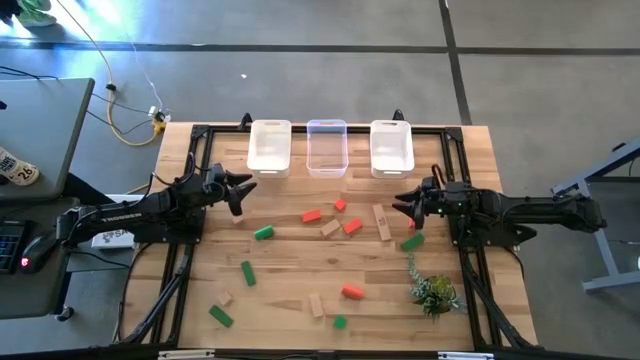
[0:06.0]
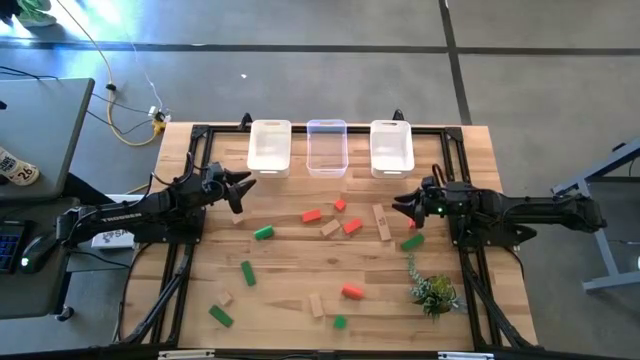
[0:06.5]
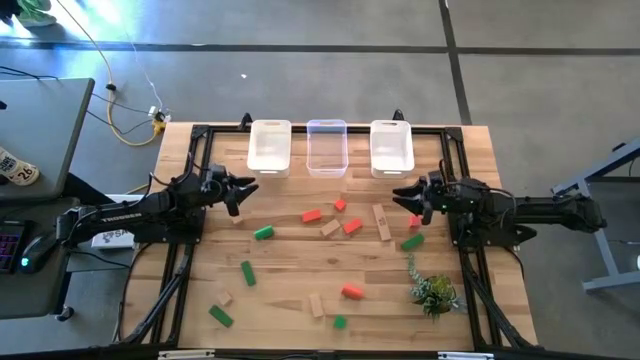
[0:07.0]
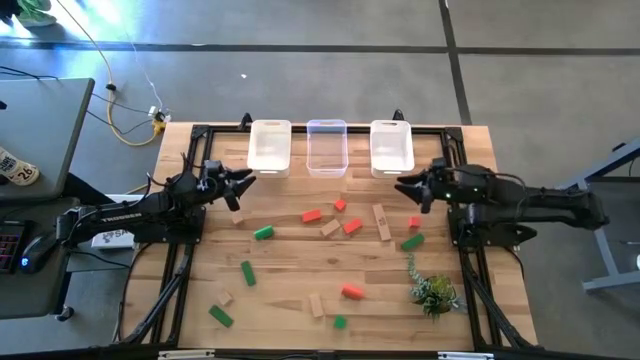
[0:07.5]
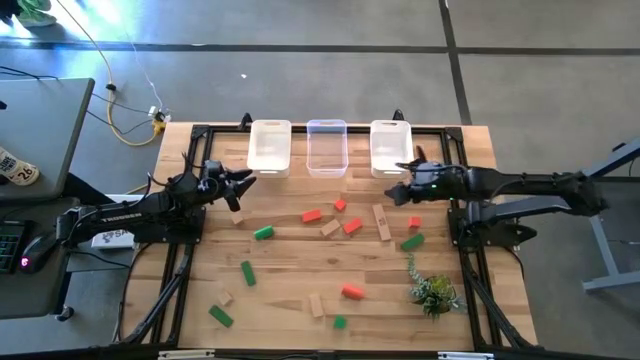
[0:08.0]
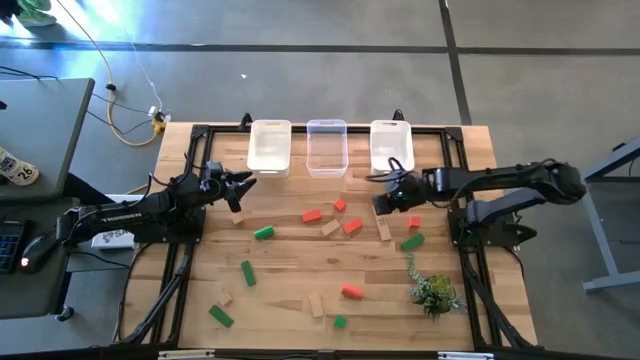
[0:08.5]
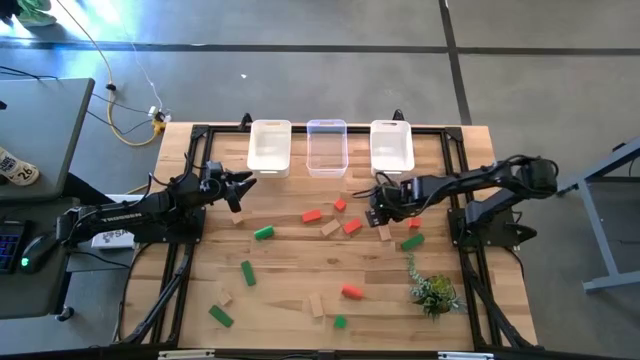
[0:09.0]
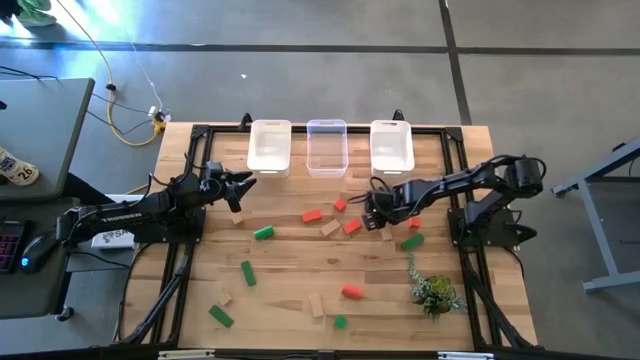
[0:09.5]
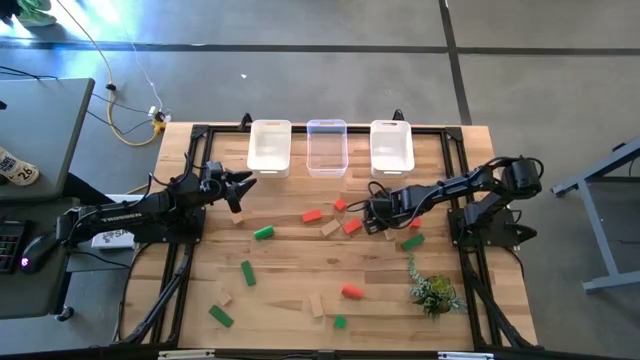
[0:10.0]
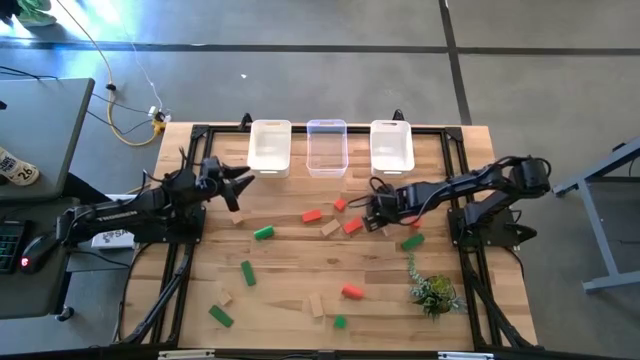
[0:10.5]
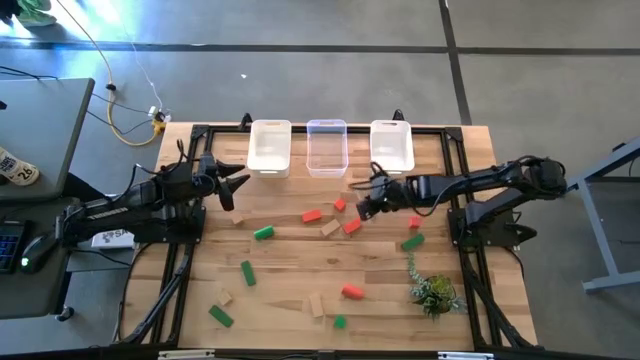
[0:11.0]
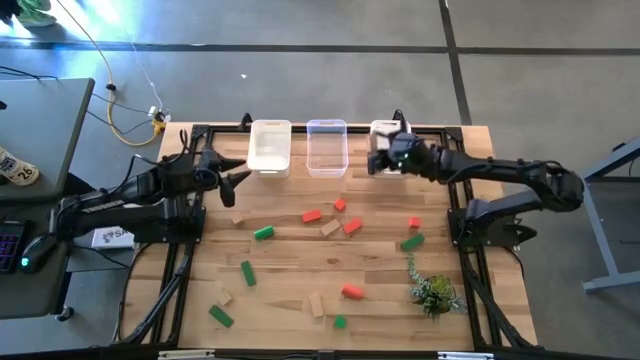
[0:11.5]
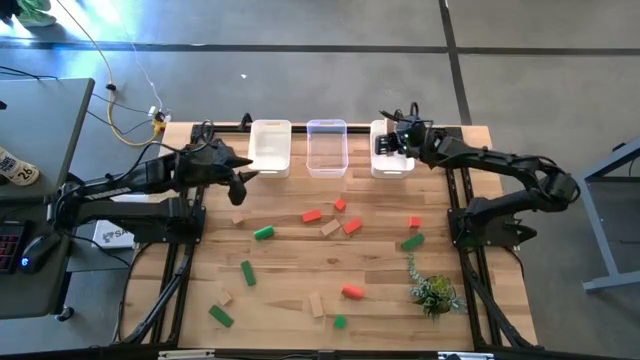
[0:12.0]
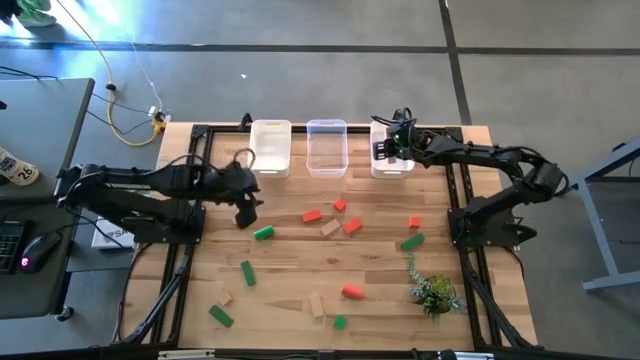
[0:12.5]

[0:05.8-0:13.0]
Task: Sort & place blocks by color
Put the brown block into the right white bin

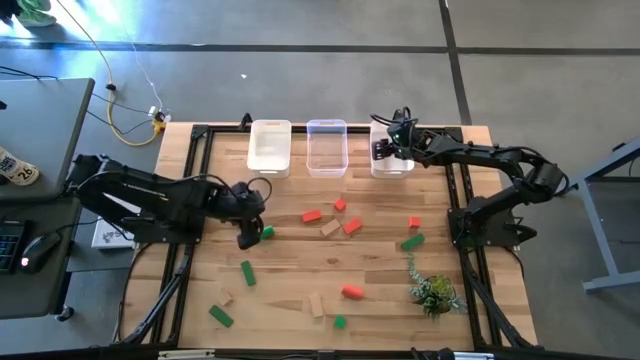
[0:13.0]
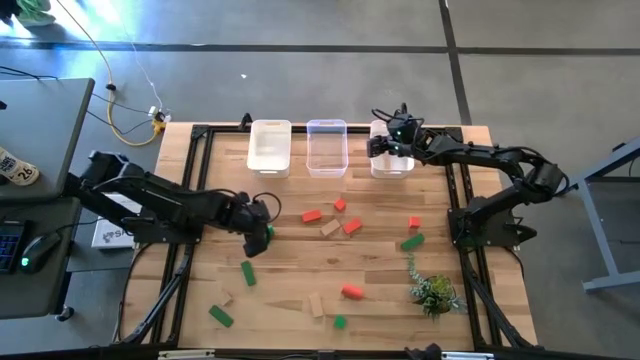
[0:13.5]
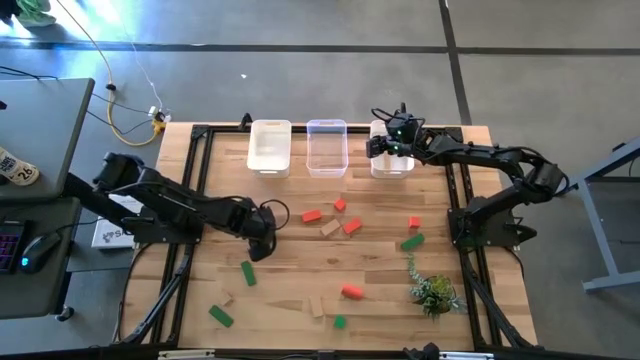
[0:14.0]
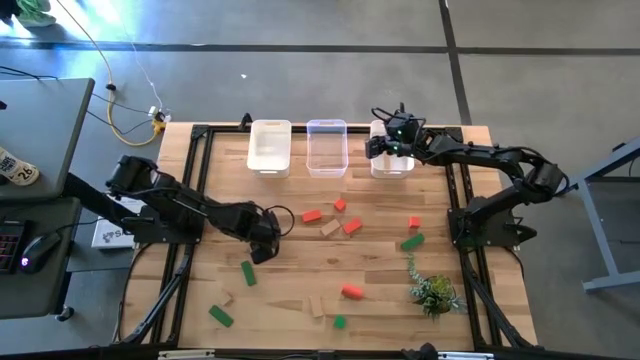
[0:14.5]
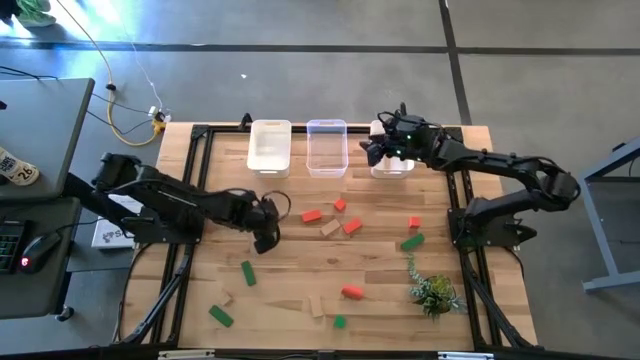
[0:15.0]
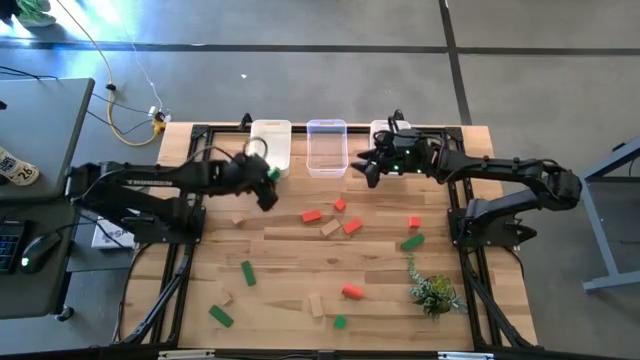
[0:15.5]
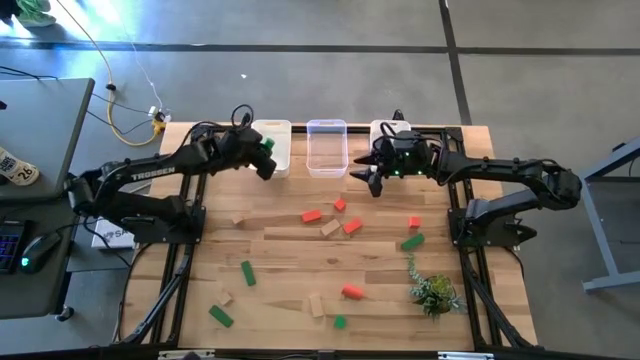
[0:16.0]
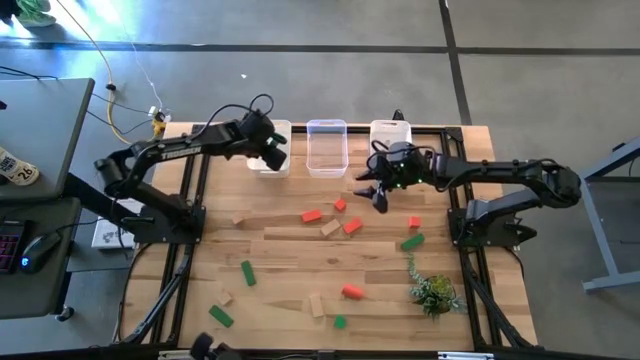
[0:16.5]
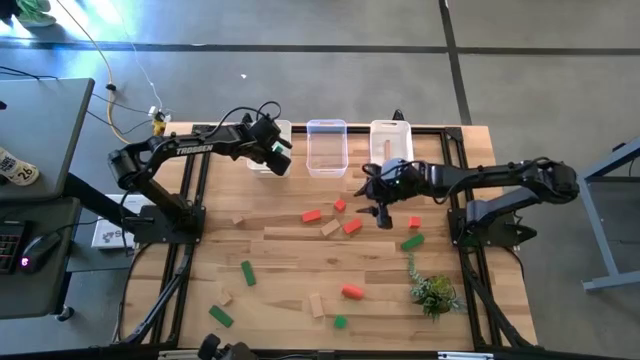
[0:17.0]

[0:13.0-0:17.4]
Put the green block into the left white bin

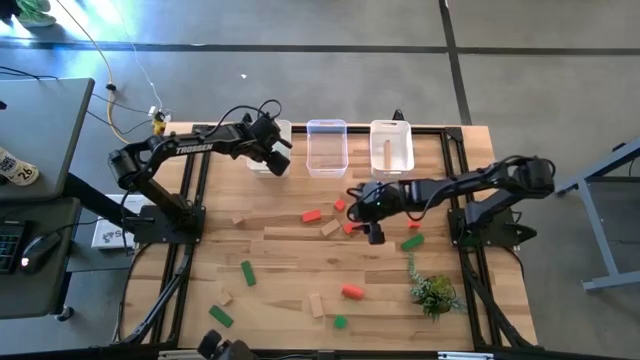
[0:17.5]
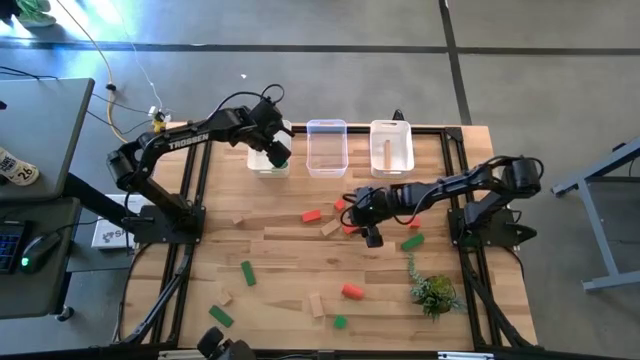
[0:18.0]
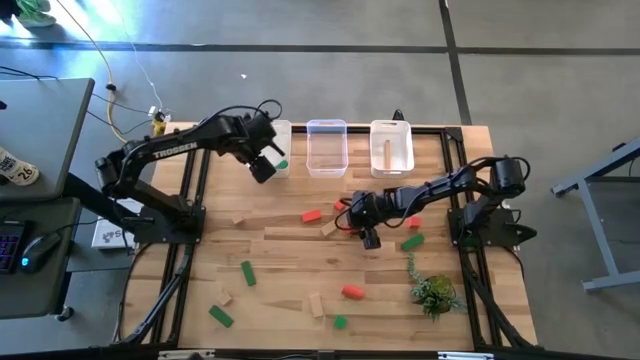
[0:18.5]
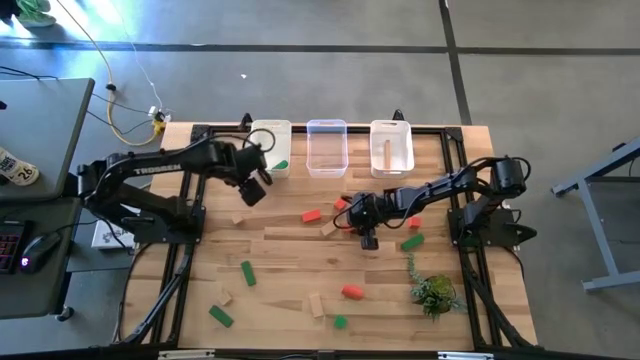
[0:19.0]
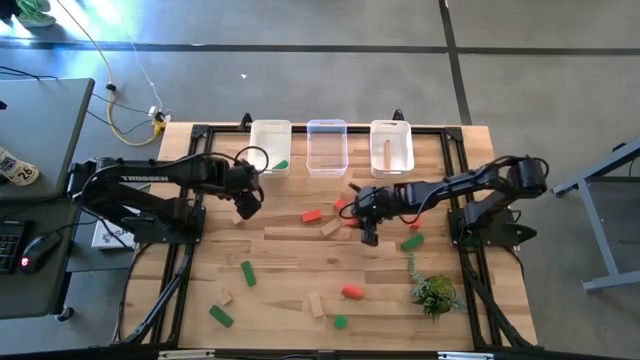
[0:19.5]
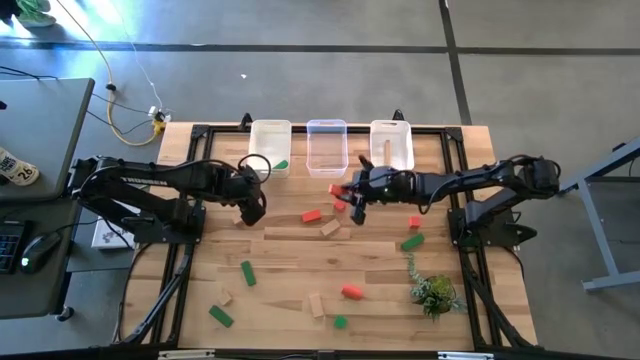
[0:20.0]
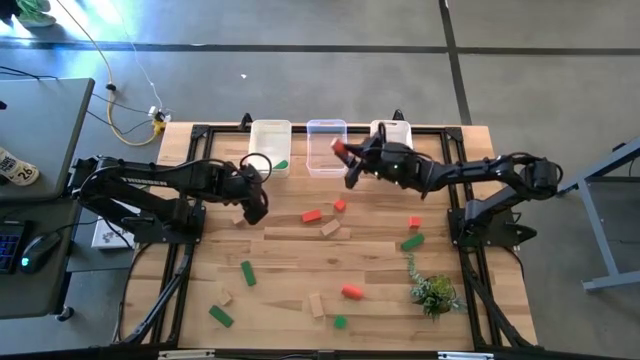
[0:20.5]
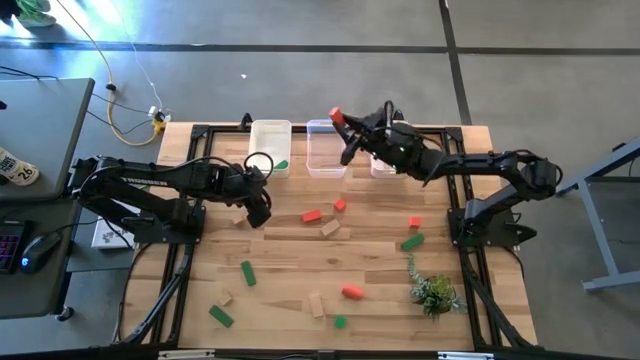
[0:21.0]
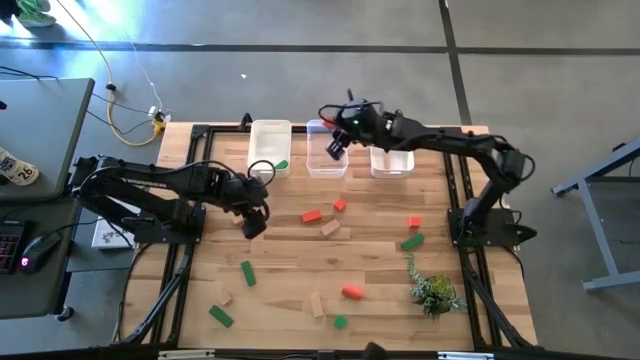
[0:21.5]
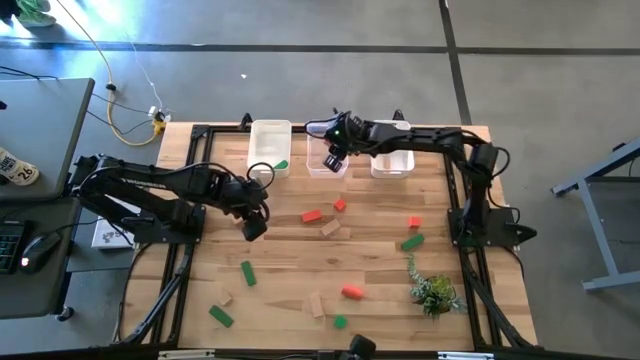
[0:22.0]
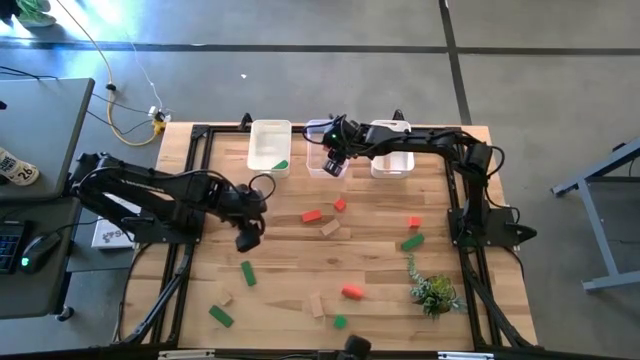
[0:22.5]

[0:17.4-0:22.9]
Put the orange block into the transparent bin

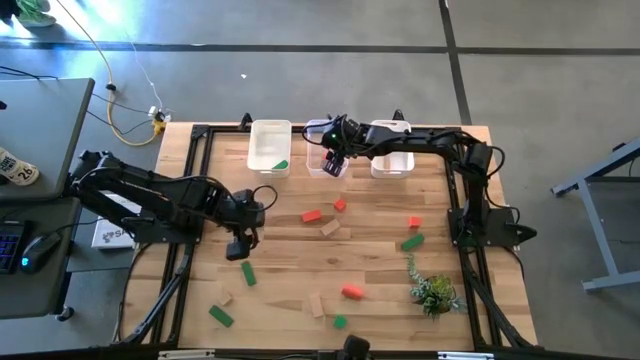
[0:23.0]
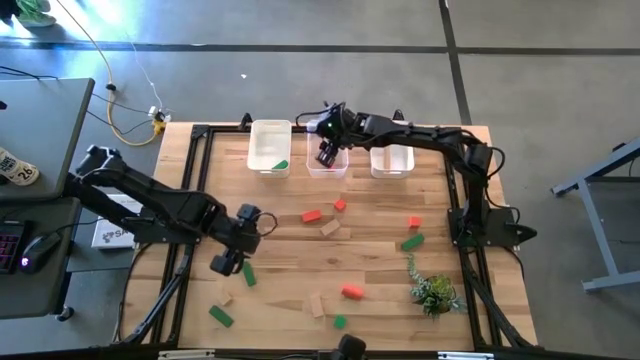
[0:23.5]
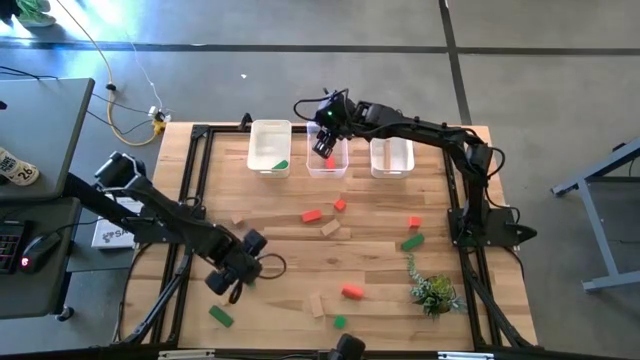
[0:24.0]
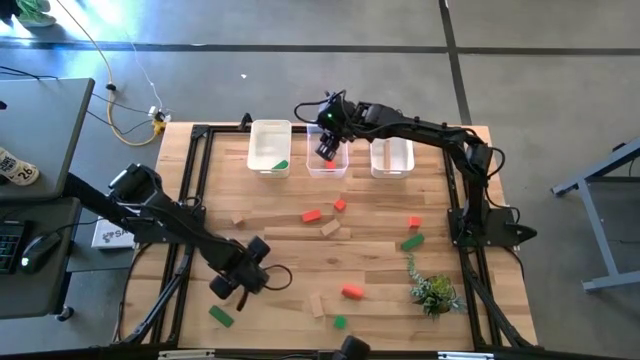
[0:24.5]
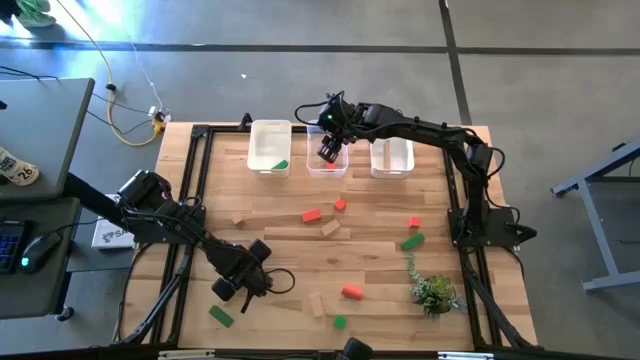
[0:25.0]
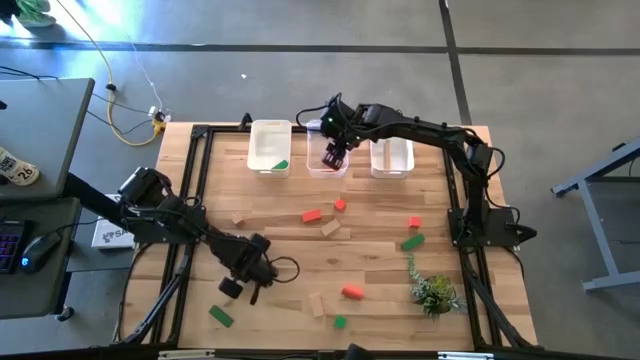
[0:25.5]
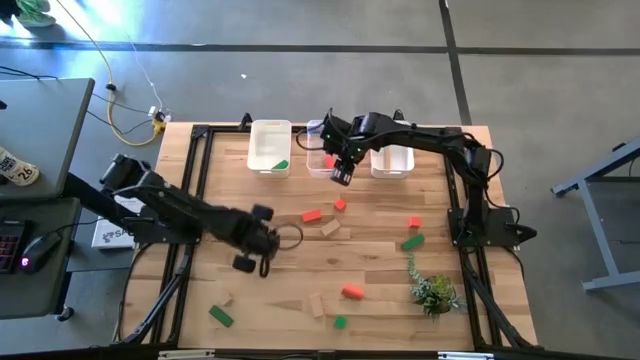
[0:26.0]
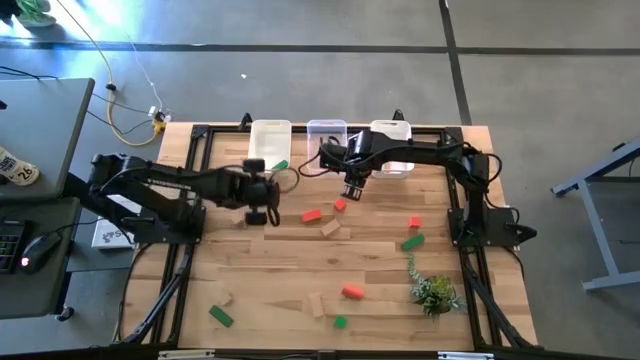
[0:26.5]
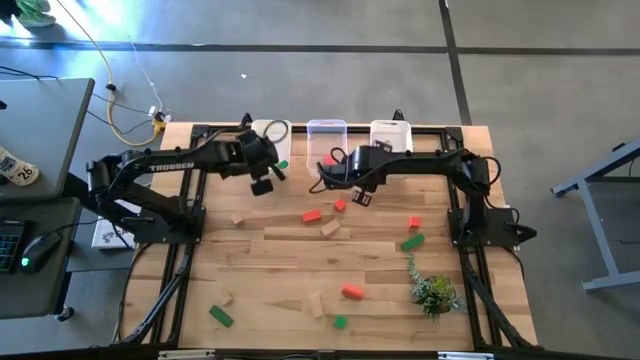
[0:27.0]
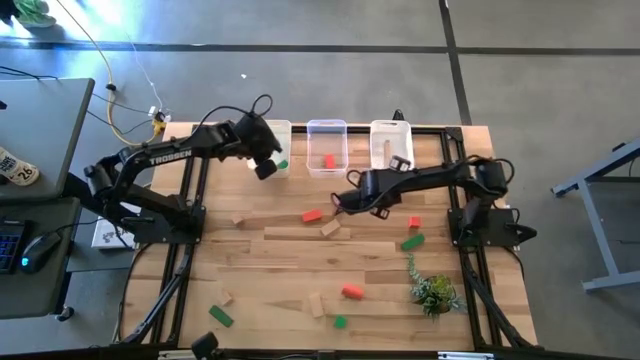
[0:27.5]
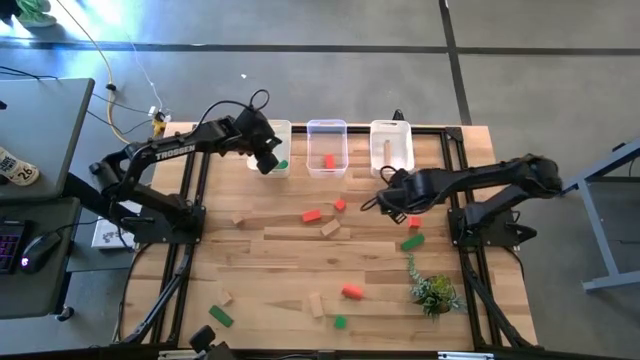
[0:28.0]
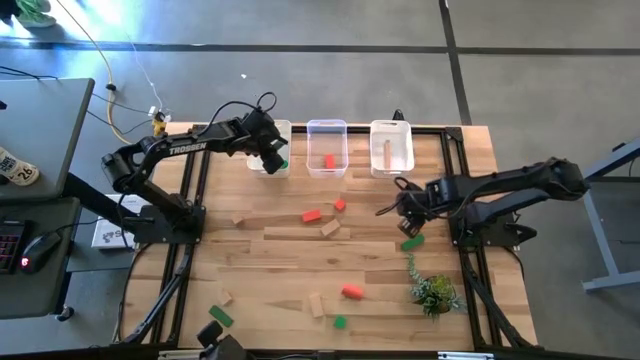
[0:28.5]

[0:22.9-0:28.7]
Put the green block into the left white bin
